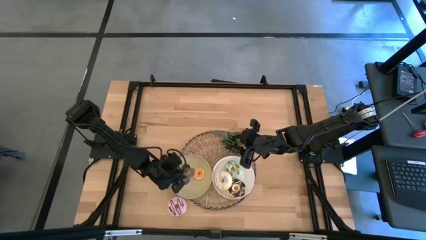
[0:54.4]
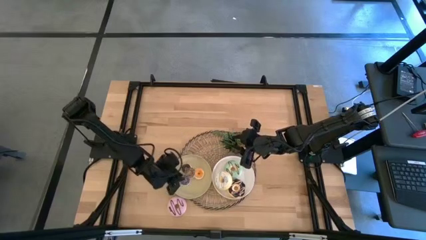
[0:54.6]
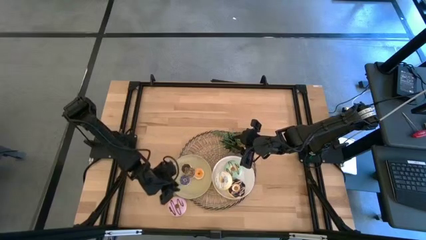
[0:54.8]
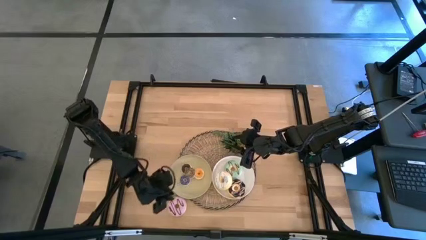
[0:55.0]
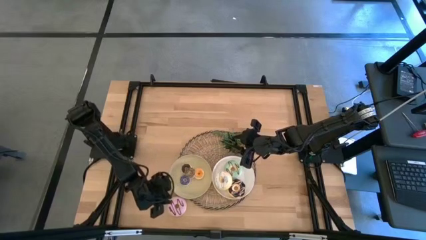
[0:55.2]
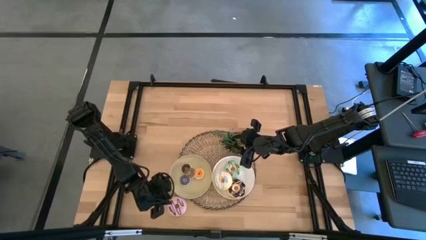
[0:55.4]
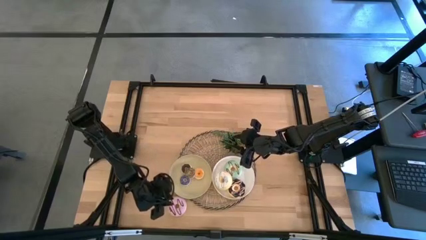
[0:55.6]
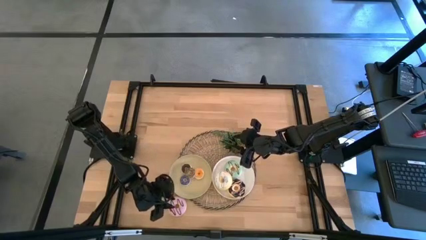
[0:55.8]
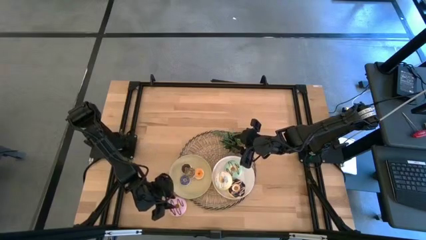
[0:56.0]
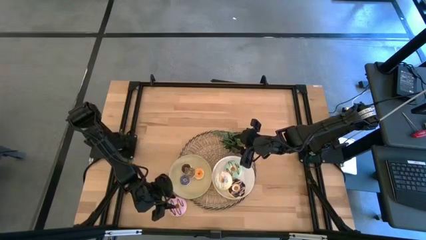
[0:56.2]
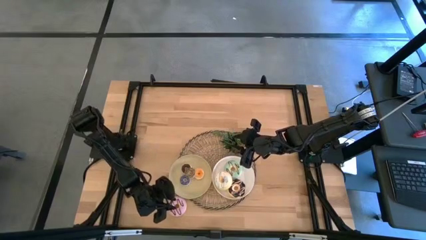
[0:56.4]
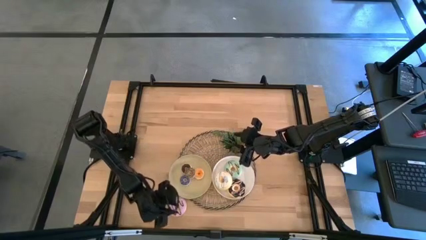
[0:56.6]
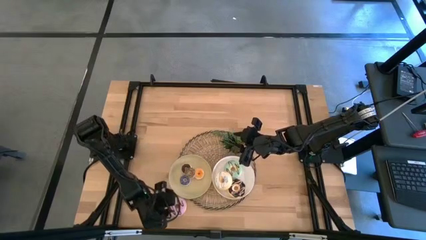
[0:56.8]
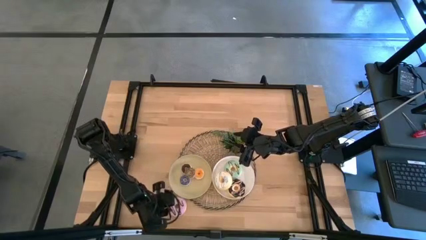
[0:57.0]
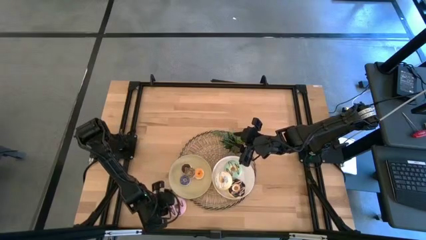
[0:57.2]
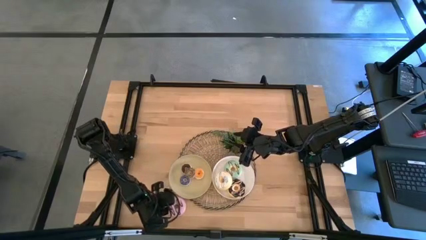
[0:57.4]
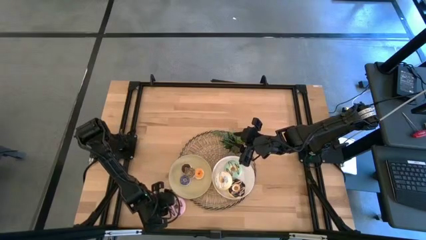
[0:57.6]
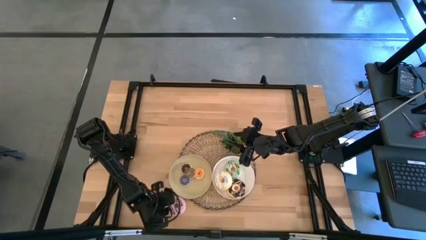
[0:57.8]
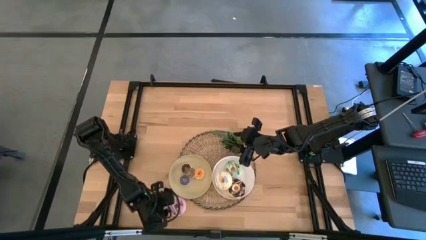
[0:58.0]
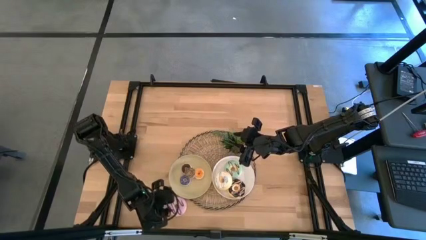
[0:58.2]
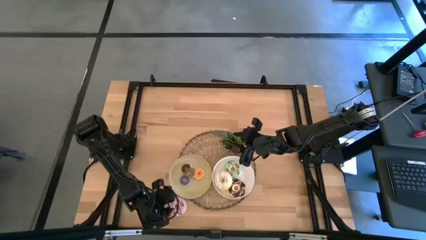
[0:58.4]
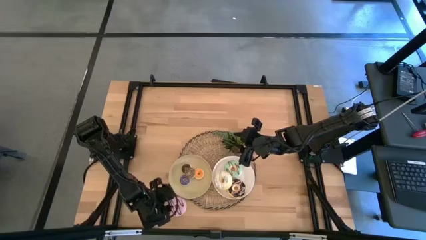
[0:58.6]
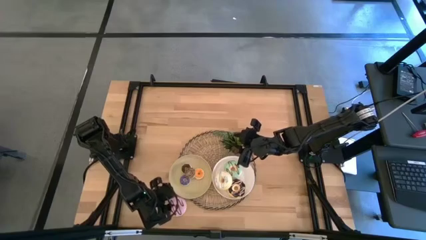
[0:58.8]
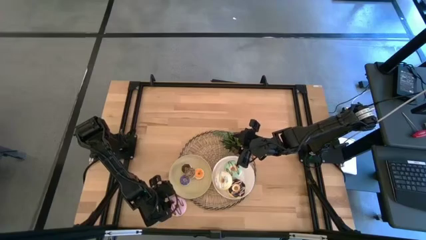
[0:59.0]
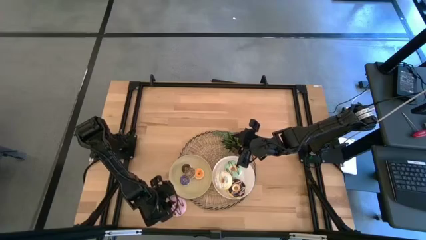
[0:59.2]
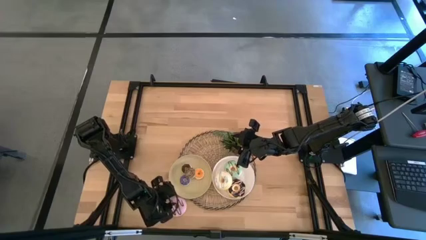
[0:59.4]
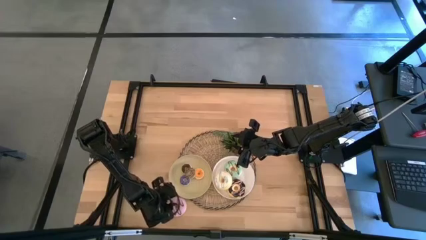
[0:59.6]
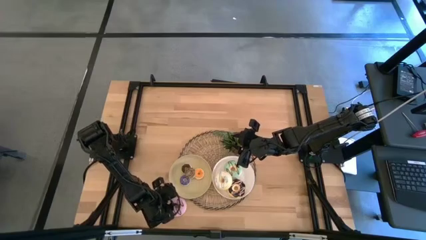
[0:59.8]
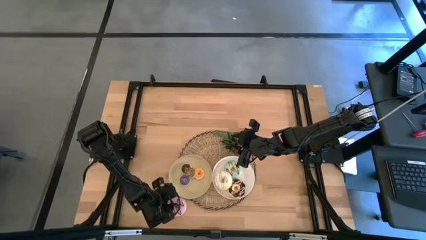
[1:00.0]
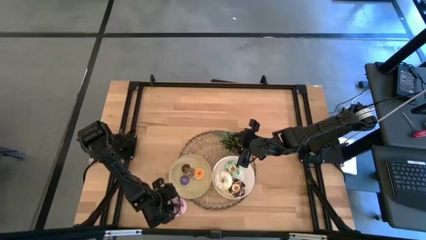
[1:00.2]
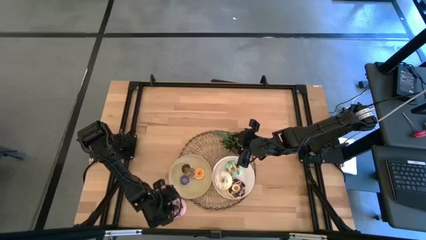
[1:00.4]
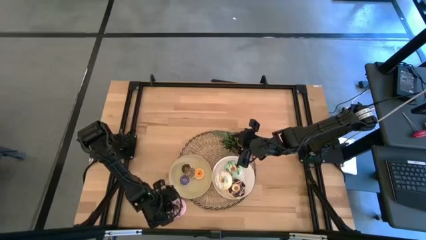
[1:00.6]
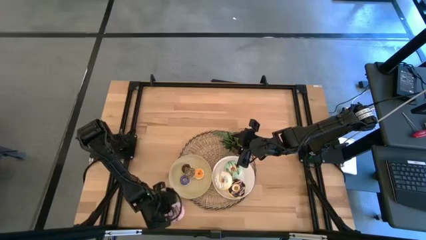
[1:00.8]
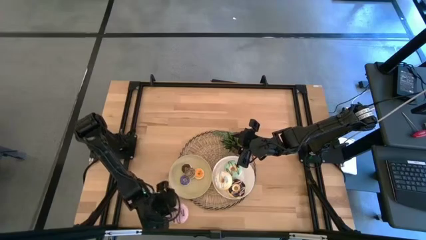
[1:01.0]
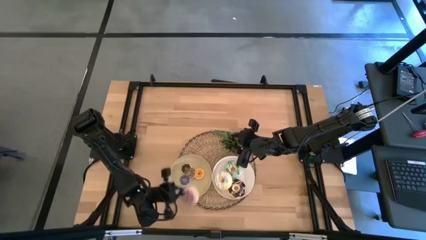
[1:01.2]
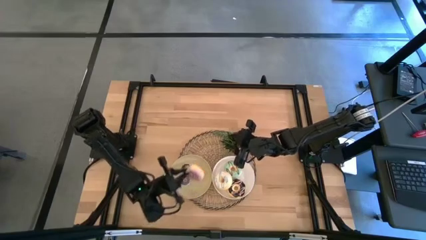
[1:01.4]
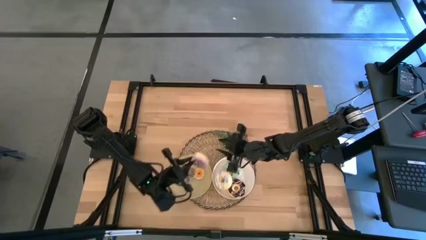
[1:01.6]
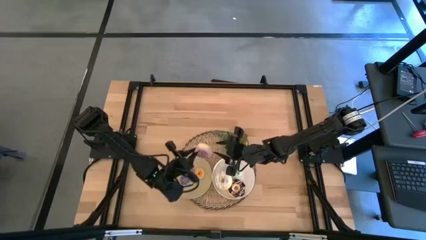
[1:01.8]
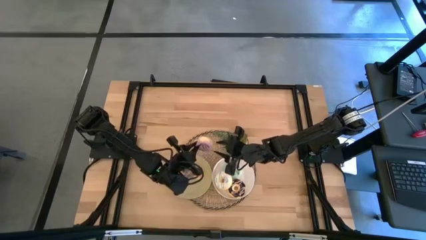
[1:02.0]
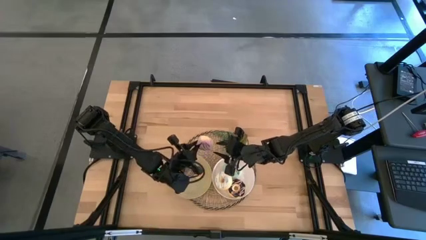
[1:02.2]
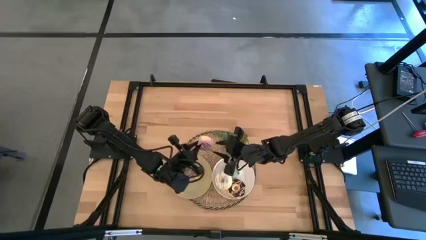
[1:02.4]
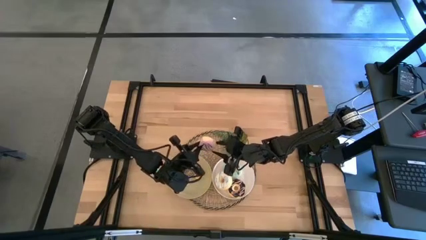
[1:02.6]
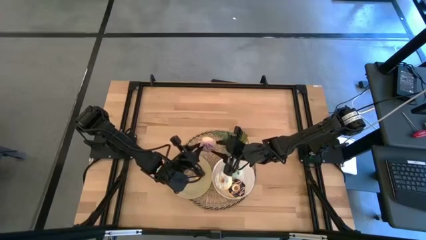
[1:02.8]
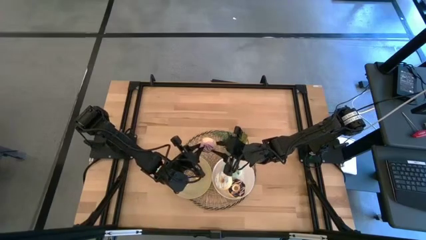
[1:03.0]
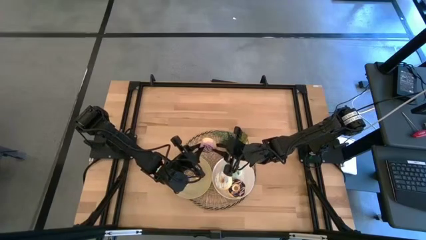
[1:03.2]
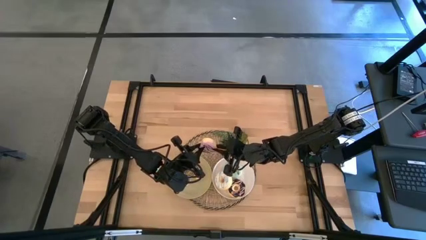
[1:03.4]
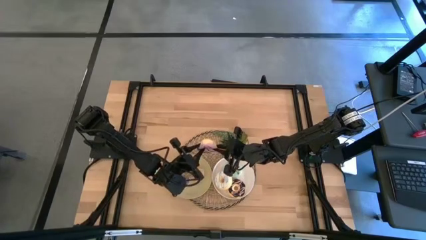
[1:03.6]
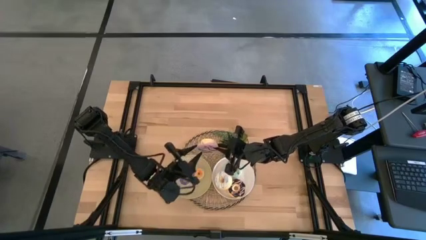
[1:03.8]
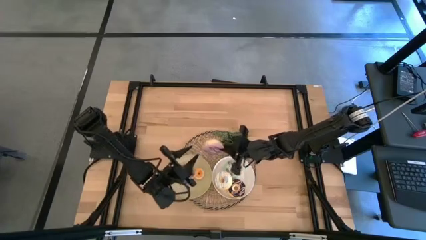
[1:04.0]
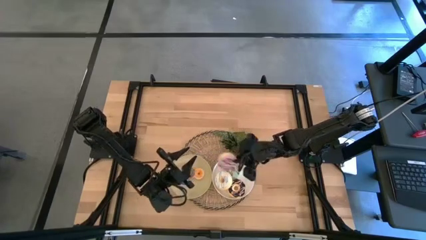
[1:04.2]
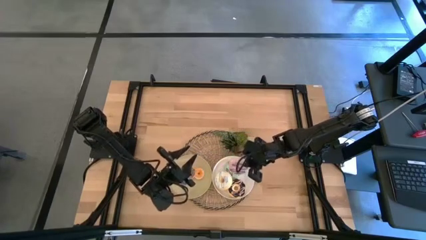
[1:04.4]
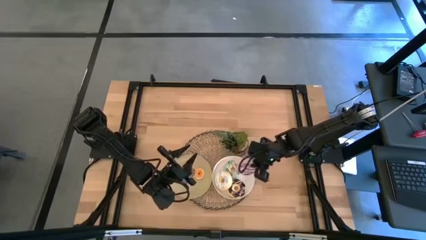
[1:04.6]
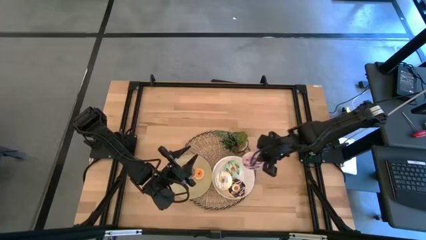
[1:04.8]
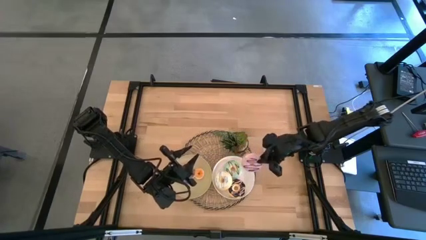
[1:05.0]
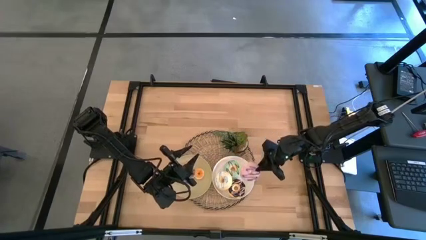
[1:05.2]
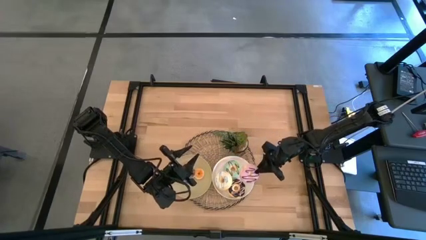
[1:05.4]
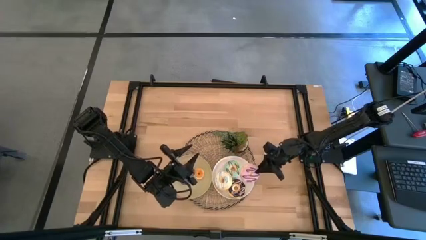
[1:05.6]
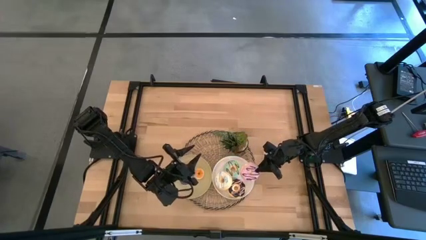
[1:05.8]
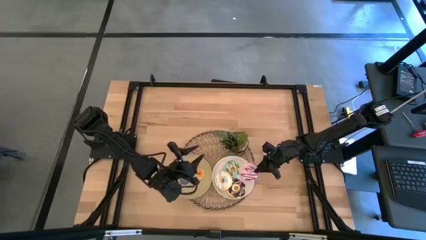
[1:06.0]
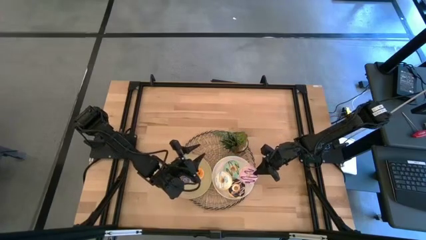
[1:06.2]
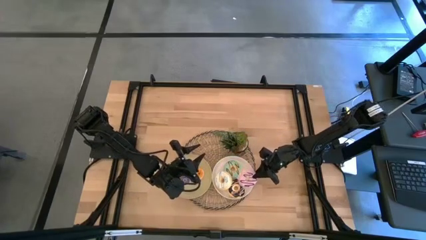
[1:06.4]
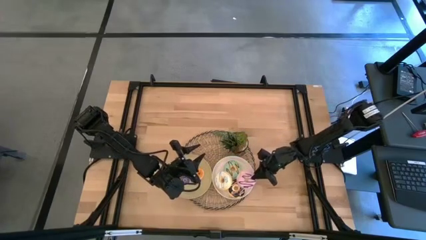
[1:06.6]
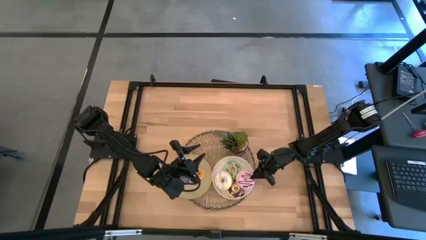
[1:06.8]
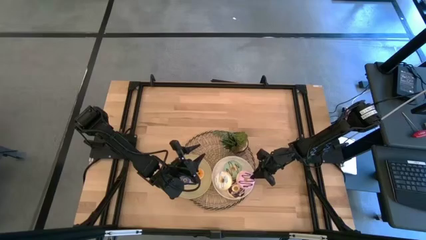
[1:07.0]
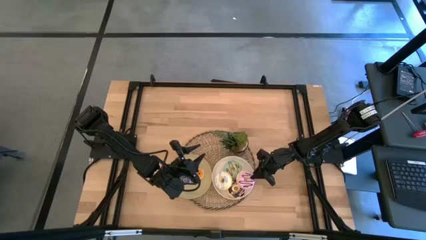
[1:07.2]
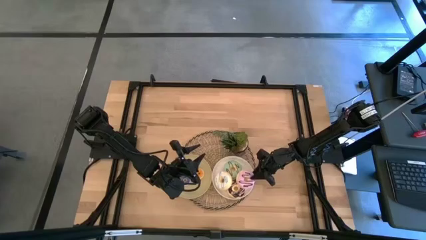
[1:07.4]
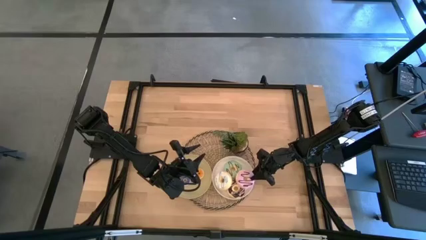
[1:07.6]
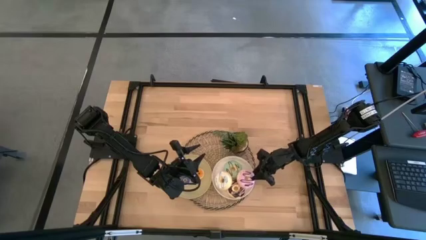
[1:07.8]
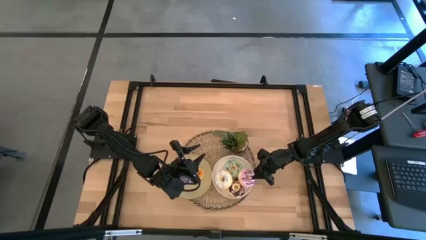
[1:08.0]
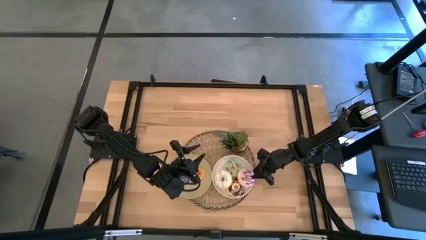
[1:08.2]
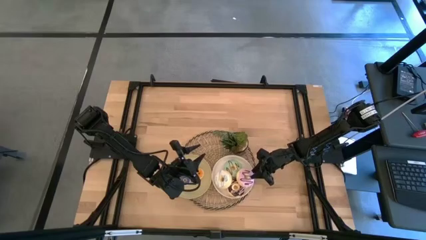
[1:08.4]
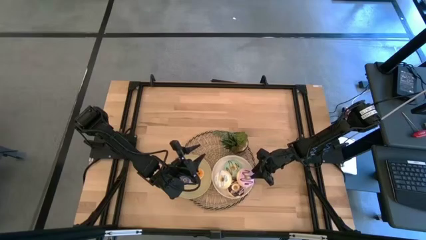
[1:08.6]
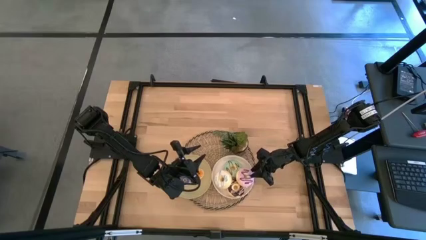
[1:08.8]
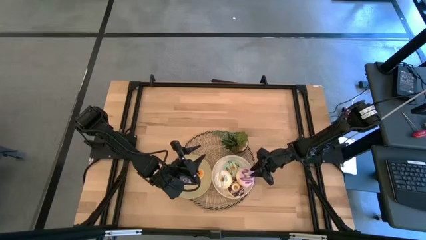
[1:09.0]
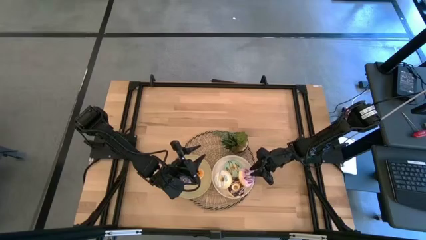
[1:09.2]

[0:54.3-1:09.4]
Task: Pick & Place donuts
Put the large pink donut on the white plate

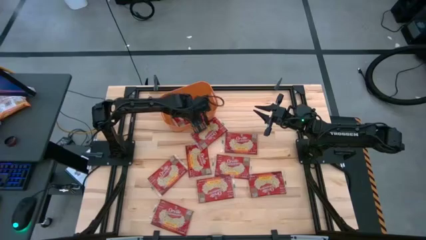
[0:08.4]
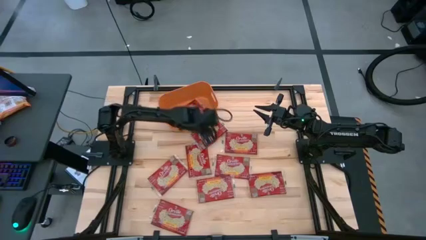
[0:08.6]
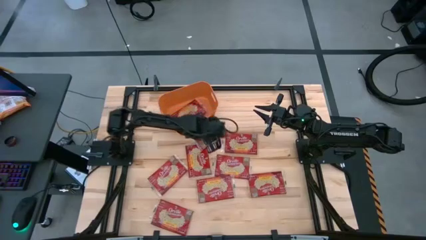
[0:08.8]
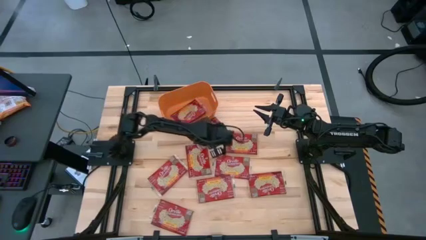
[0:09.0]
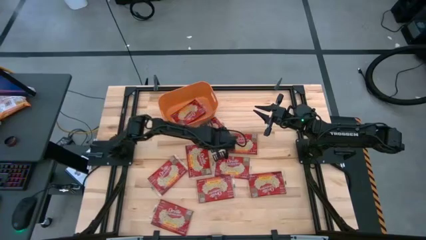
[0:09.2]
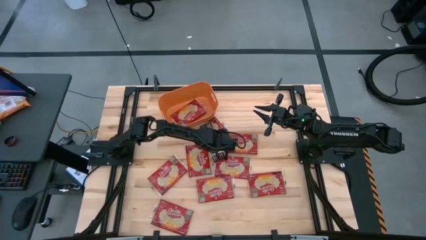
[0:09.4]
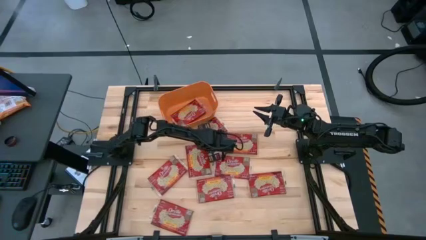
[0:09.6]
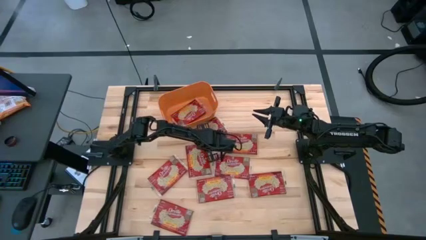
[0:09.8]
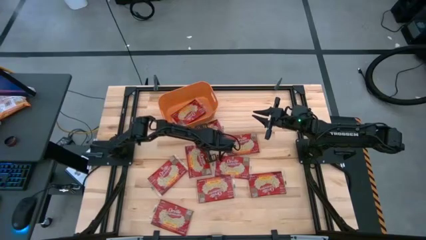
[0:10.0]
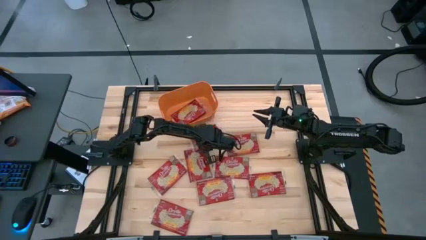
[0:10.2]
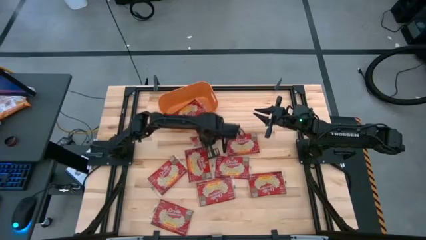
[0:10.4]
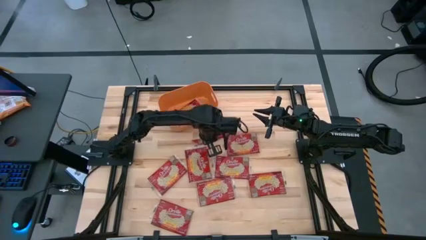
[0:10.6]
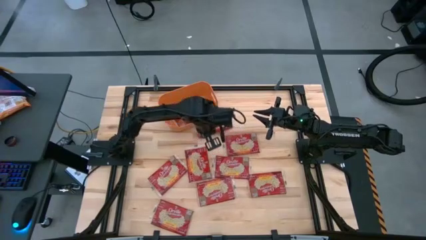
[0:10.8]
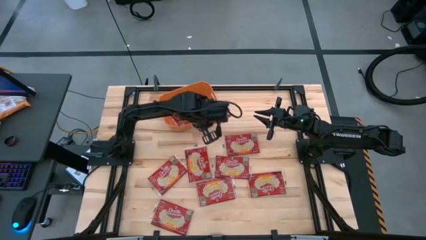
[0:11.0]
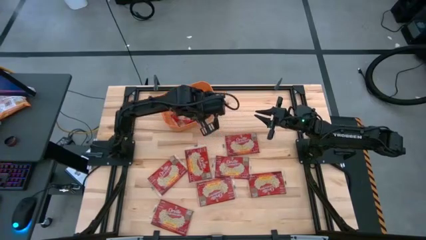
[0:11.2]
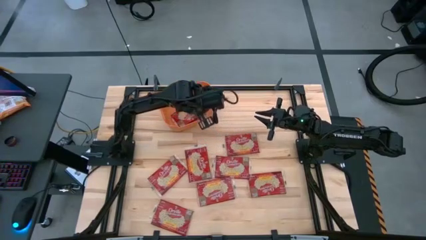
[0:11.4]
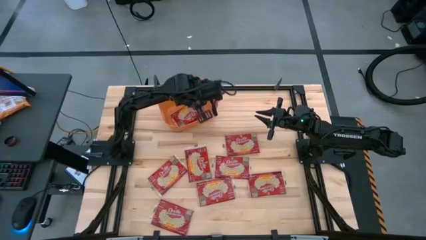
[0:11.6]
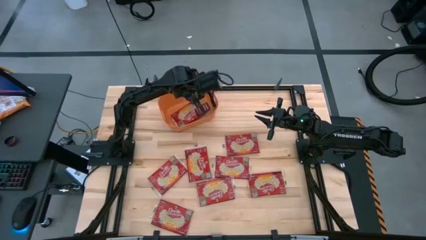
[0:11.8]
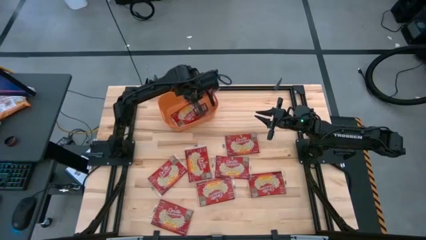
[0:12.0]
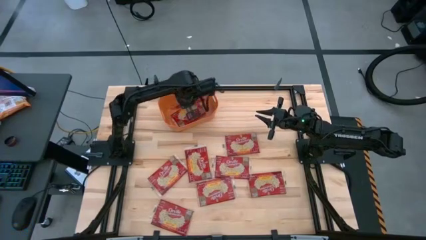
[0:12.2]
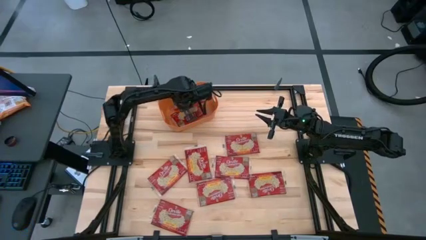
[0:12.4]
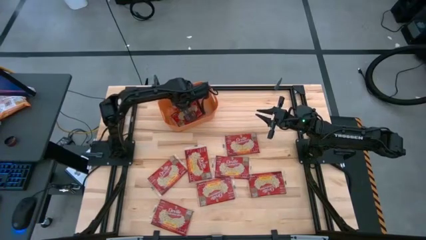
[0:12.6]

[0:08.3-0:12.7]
Task: Sort popcorn bags into baskets
Put the red popcorn pack into the orange bin
